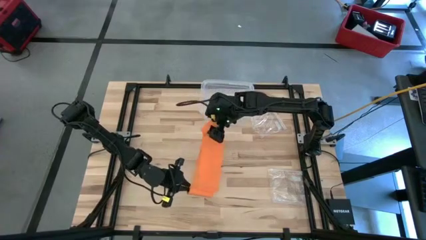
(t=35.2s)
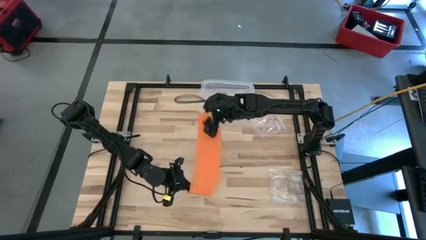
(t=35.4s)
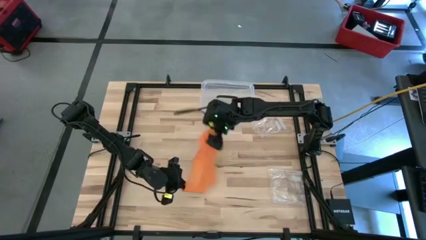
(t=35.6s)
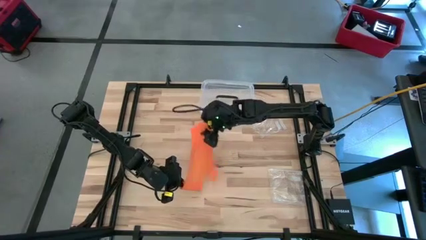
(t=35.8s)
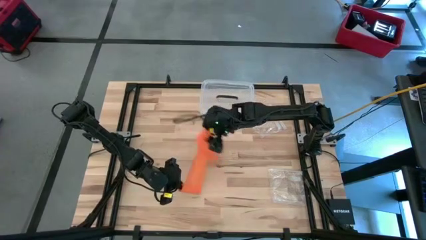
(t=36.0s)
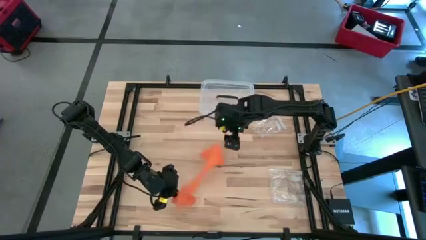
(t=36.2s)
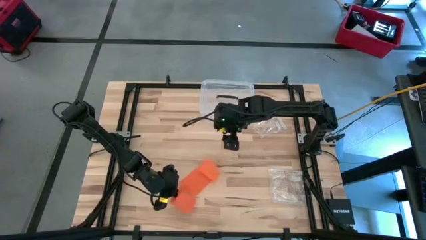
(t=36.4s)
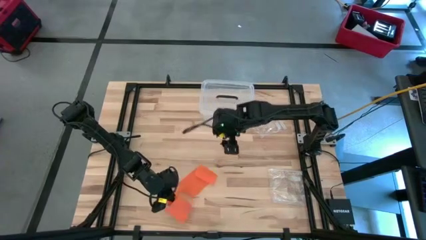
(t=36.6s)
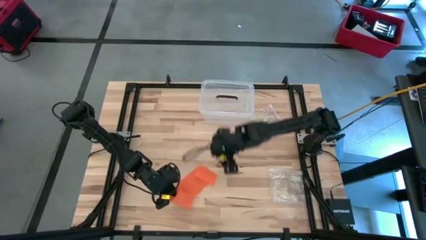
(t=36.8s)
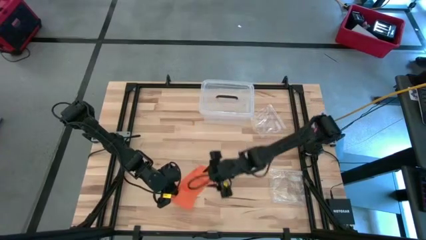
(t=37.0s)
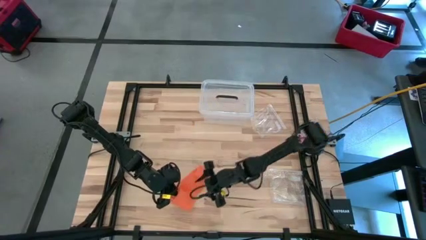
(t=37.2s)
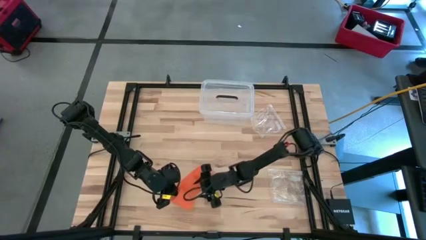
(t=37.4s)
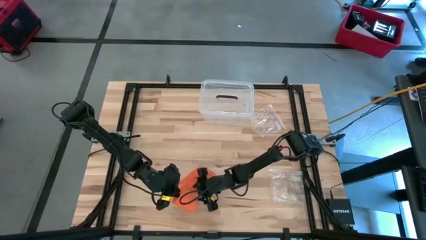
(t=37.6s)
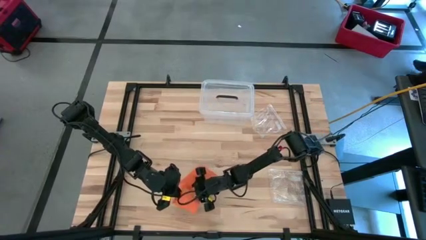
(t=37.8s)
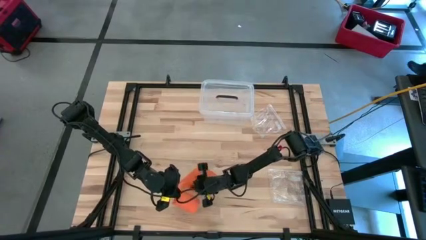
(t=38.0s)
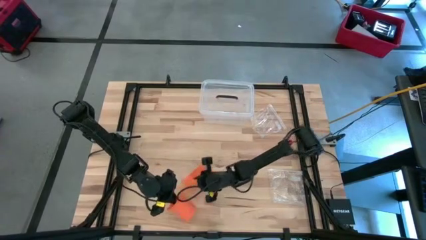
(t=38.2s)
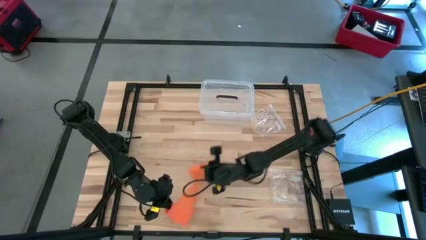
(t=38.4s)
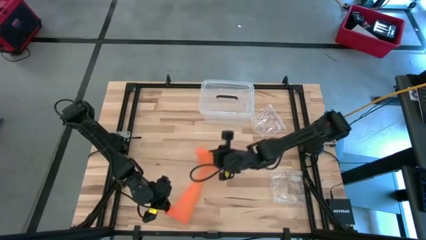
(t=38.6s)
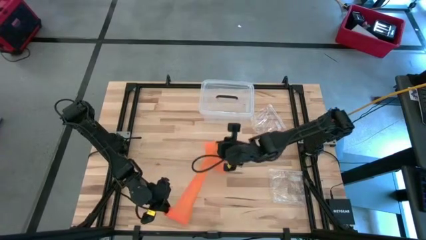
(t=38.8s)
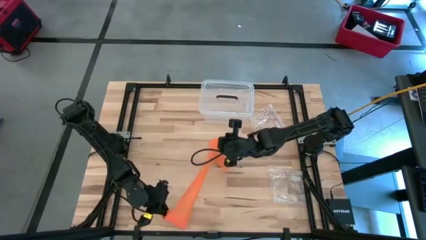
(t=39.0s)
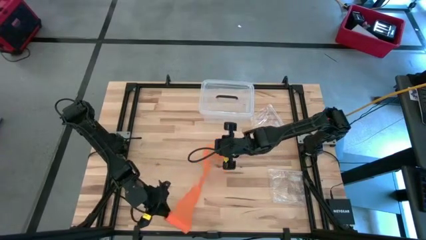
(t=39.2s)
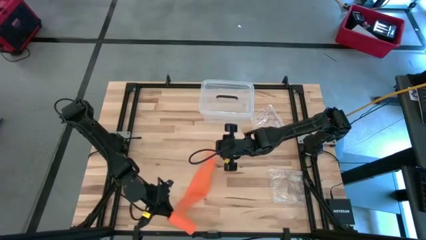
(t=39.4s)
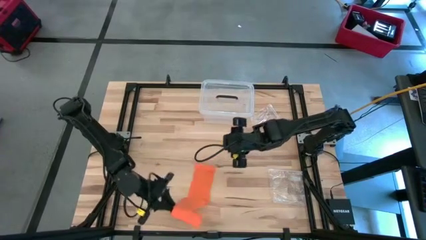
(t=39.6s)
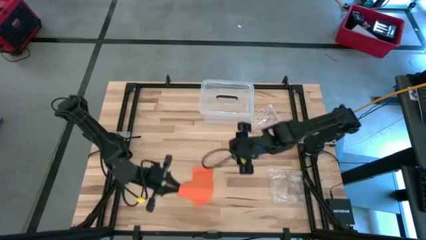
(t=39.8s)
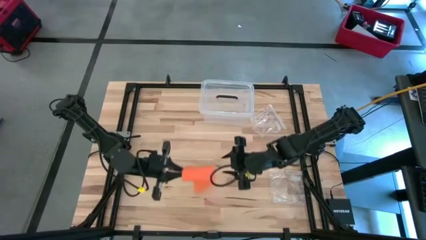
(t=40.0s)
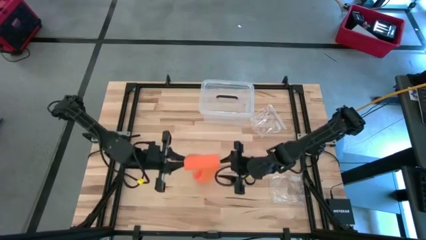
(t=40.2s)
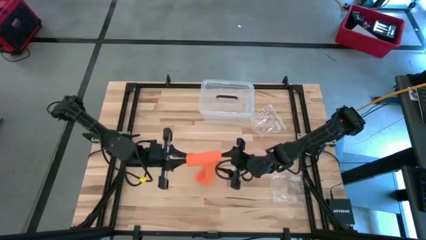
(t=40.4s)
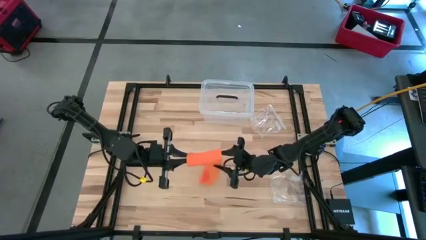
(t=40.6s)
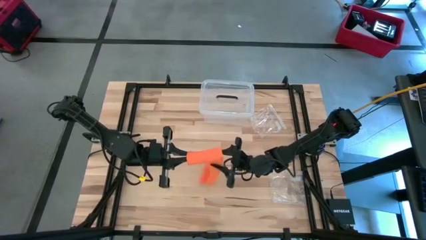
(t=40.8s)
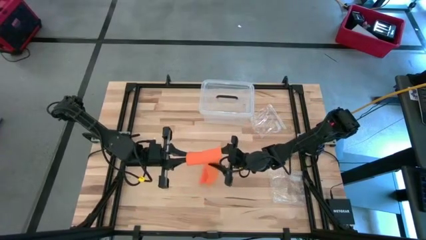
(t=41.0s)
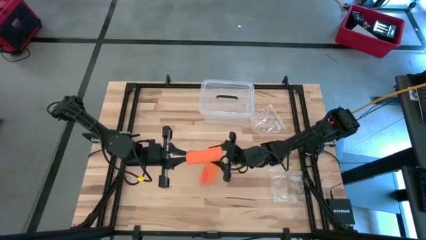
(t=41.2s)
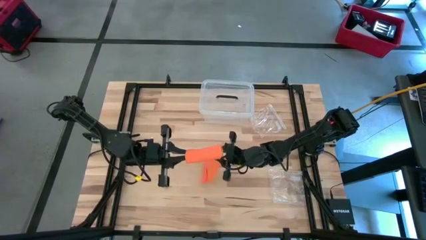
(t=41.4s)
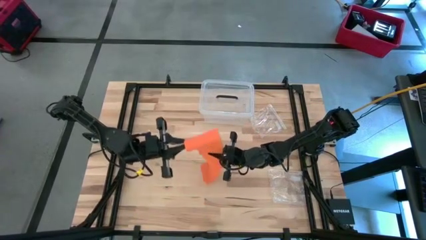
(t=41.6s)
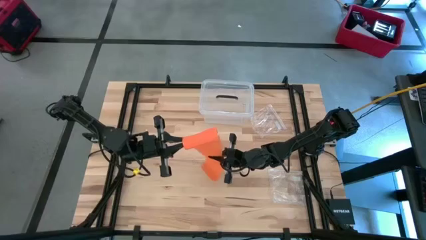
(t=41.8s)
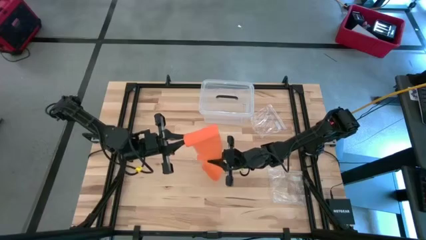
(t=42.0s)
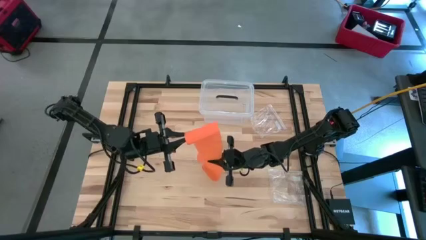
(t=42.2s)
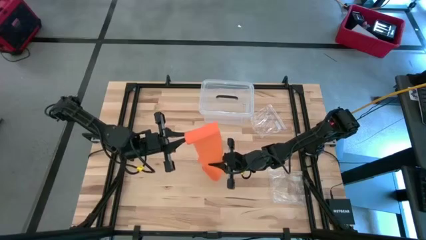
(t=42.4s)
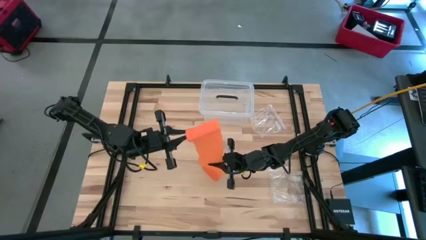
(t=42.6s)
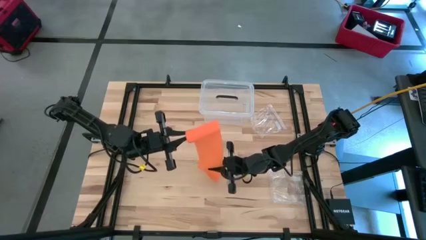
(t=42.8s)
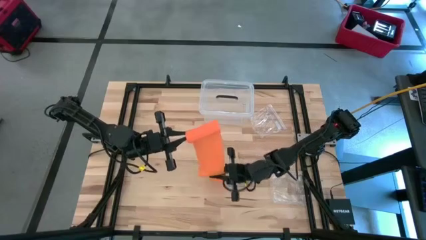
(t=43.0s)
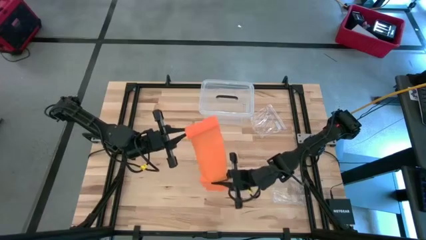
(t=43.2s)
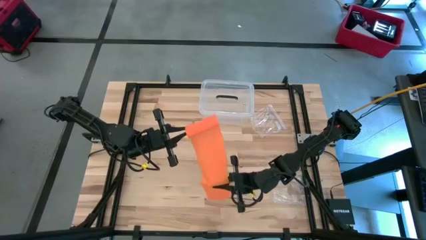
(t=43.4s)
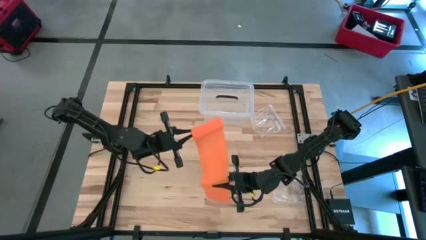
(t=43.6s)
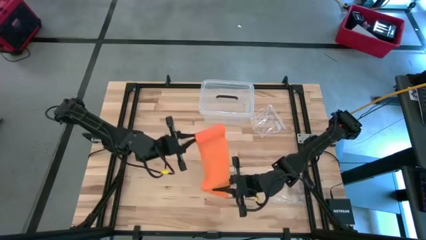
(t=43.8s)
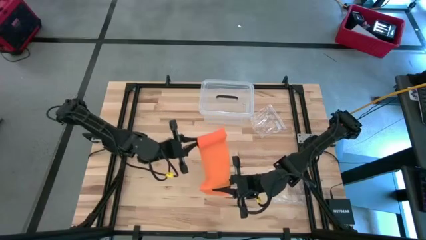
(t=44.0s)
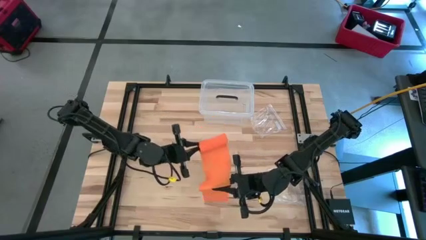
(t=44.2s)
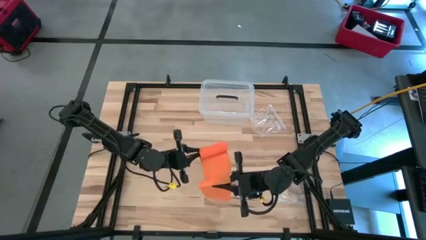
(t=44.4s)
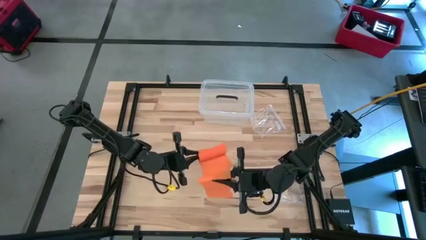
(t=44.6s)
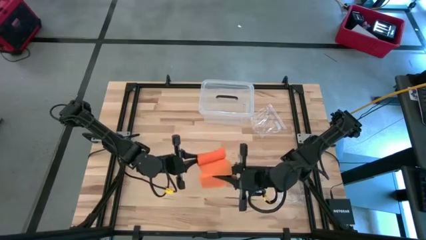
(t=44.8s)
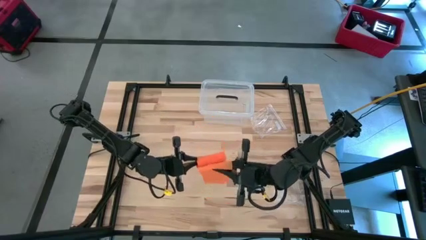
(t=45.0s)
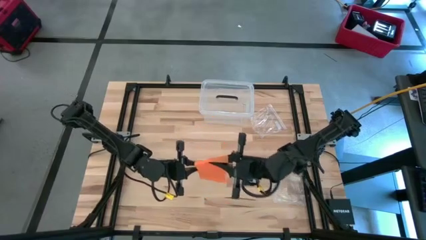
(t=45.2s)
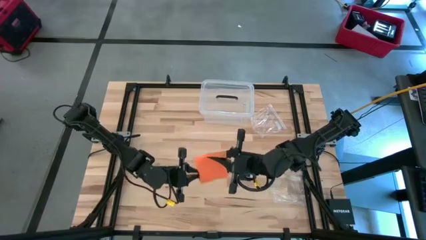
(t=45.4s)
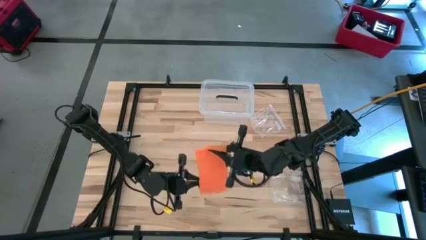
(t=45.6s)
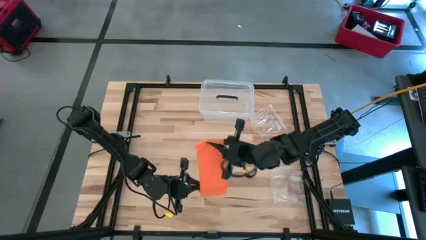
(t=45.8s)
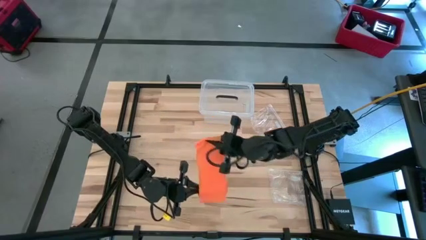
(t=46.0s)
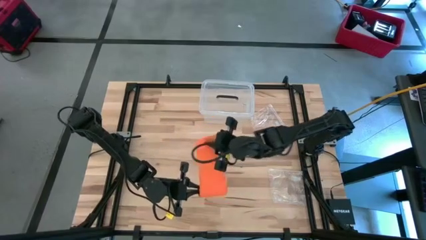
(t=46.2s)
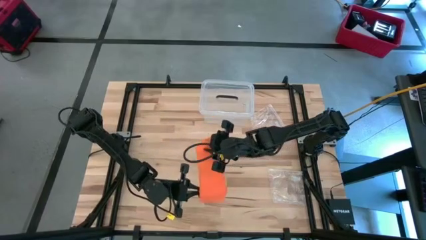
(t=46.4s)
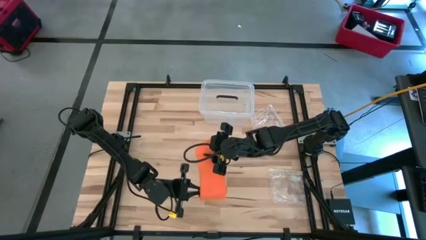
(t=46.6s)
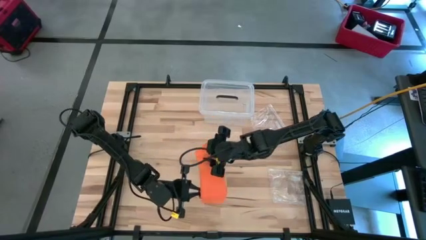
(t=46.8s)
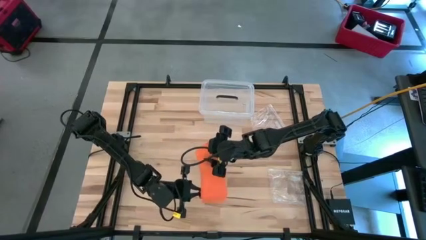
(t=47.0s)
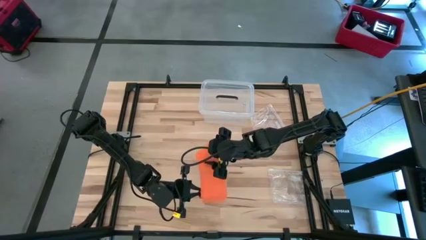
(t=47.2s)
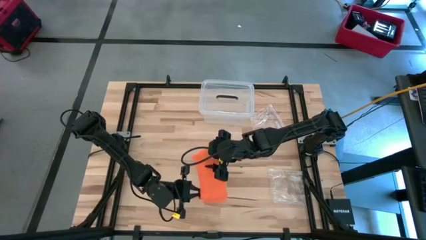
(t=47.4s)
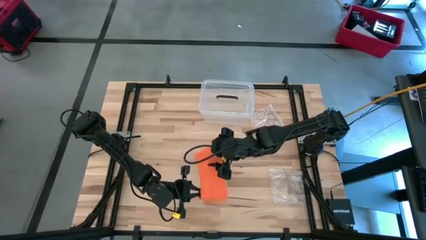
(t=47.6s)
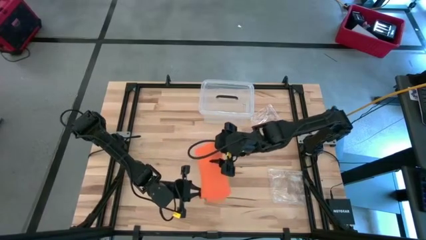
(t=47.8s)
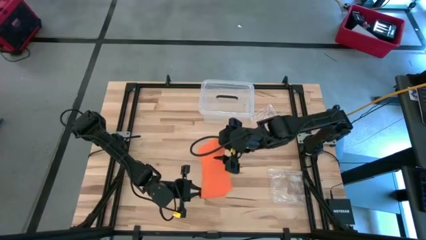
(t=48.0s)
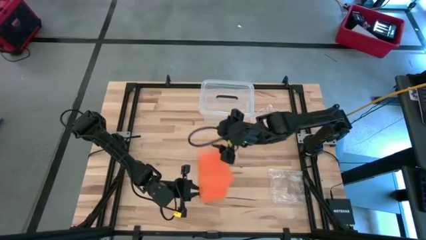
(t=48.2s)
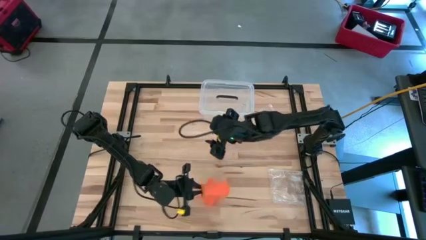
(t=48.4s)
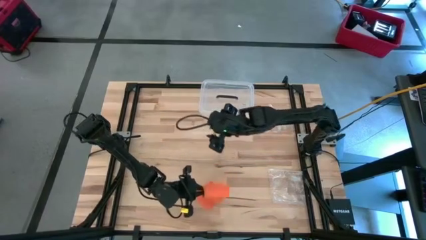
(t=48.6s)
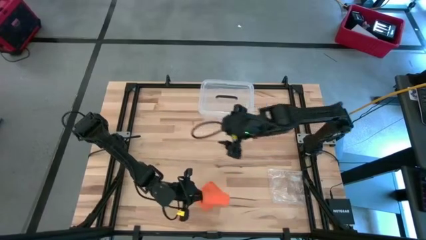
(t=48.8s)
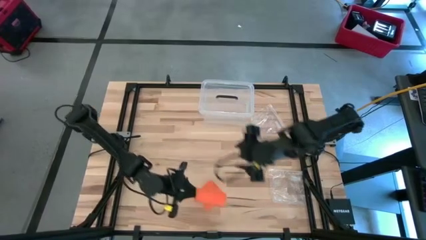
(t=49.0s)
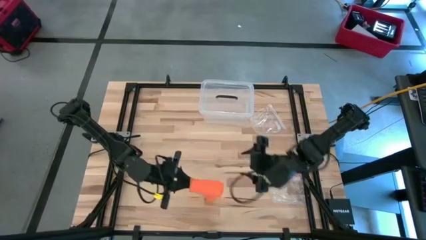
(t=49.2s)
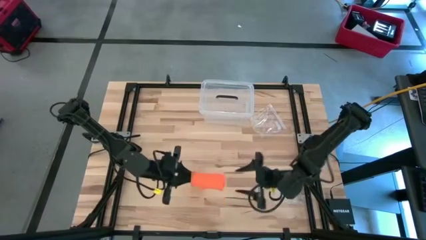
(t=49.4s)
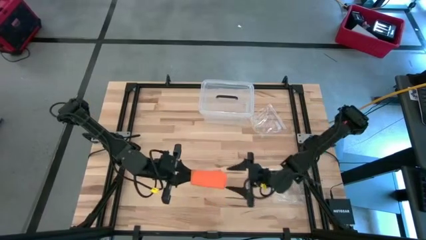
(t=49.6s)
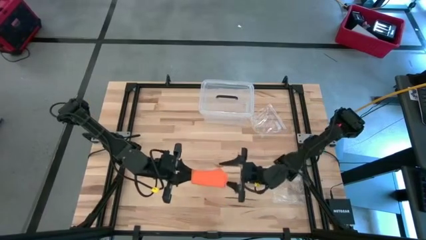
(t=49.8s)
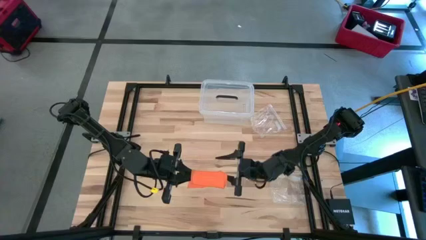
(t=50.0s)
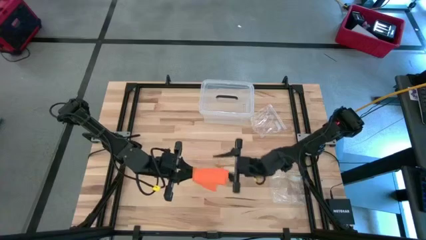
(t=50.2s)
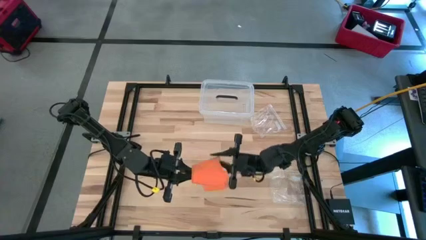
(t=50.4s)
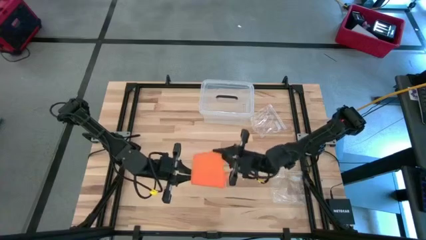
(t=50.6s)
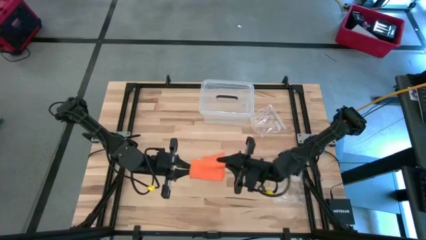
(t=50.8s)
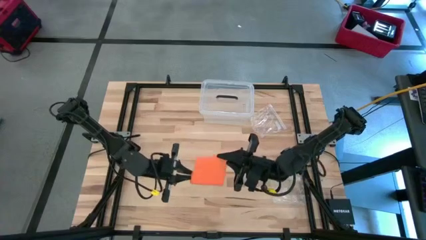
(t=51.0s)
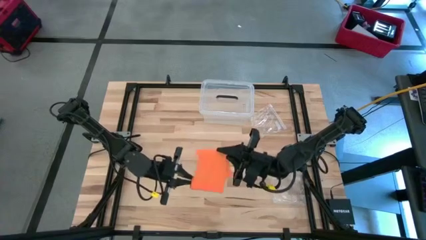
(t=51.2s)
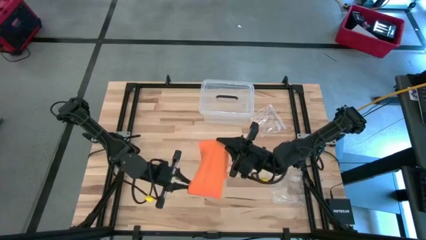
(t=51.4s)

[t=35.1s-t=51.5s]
Task: Roll bandage
Roll the orange bandage
